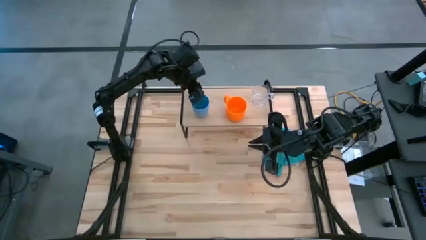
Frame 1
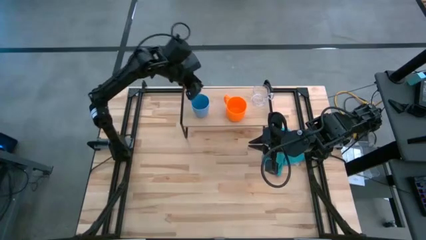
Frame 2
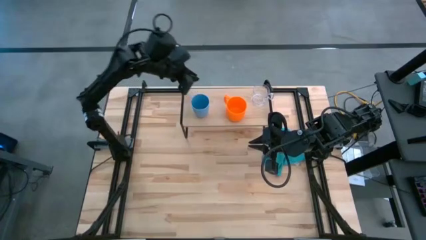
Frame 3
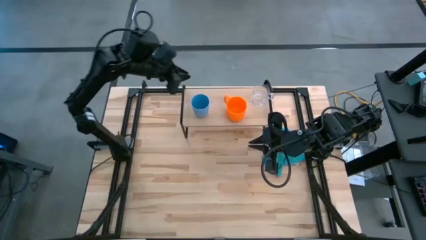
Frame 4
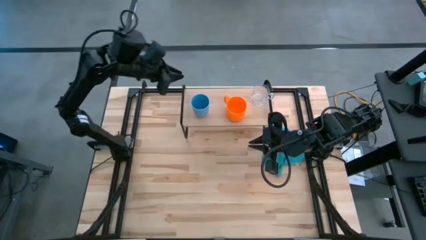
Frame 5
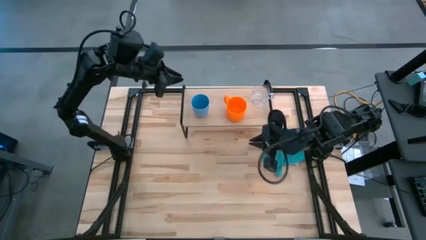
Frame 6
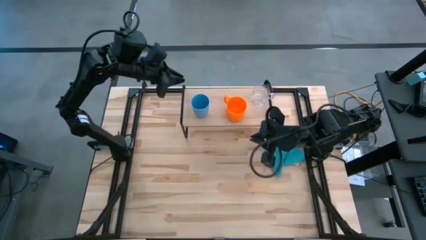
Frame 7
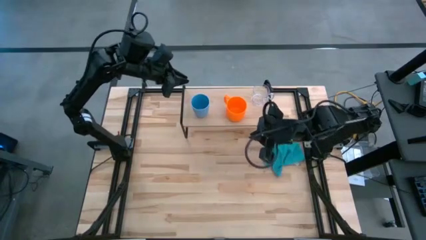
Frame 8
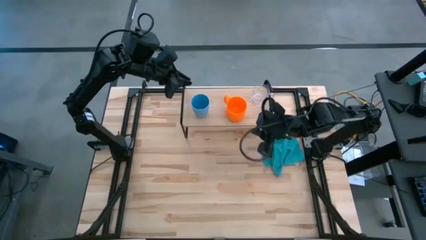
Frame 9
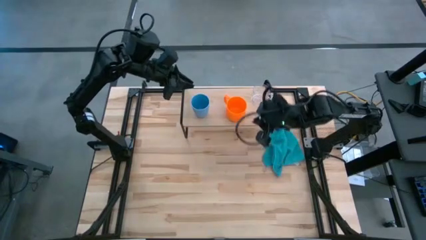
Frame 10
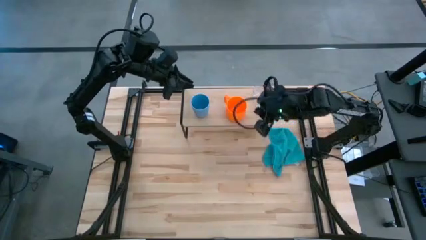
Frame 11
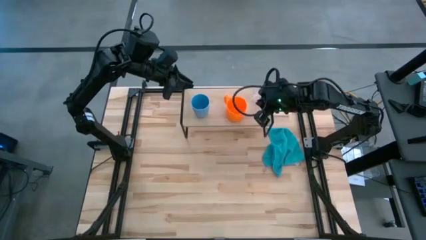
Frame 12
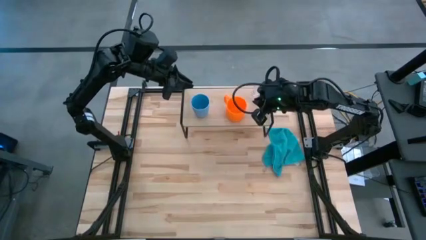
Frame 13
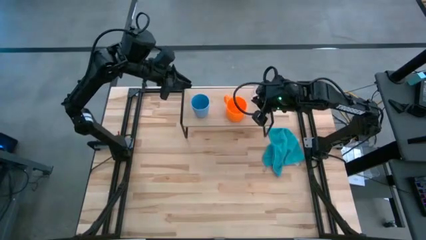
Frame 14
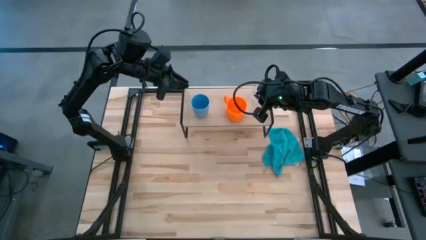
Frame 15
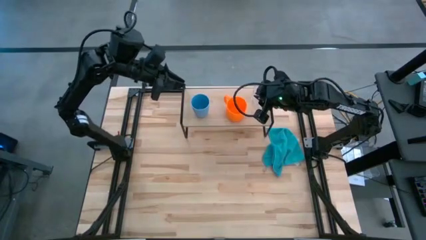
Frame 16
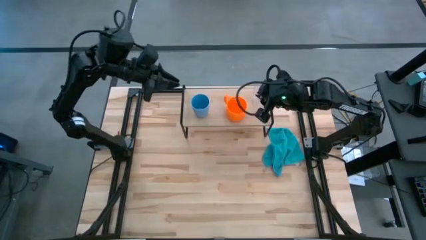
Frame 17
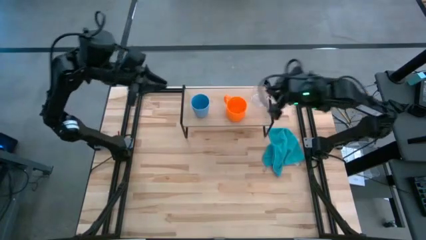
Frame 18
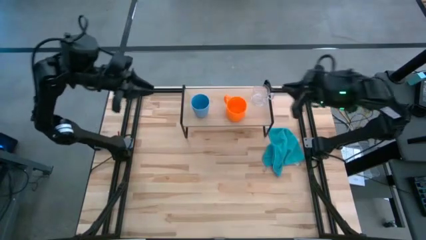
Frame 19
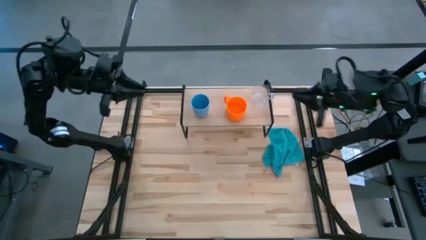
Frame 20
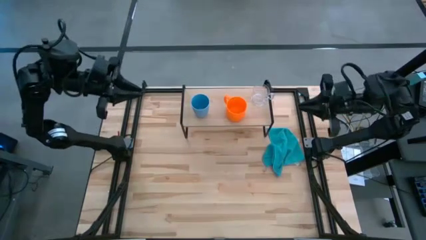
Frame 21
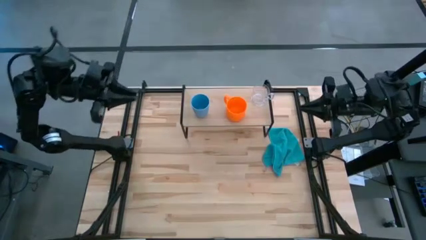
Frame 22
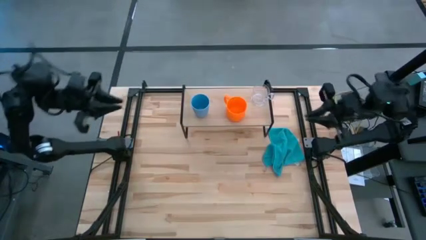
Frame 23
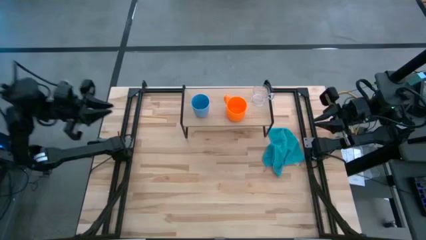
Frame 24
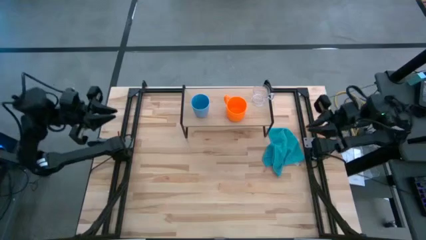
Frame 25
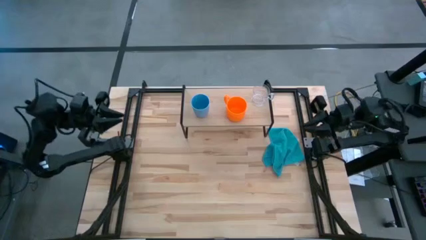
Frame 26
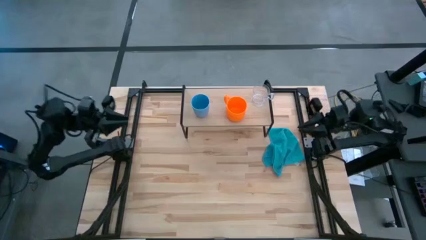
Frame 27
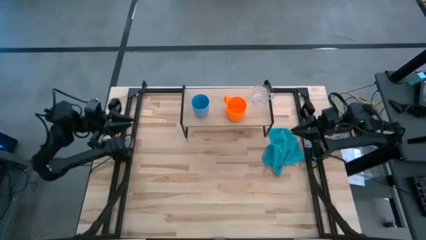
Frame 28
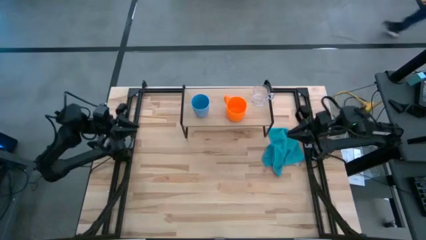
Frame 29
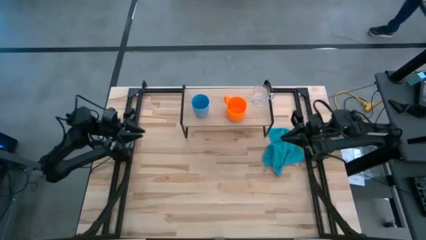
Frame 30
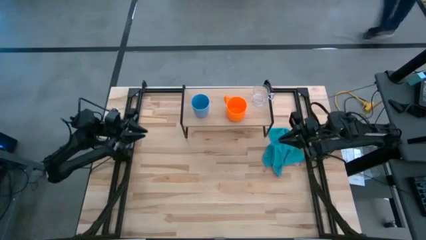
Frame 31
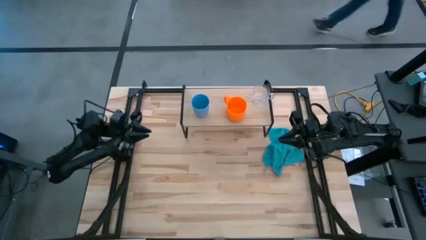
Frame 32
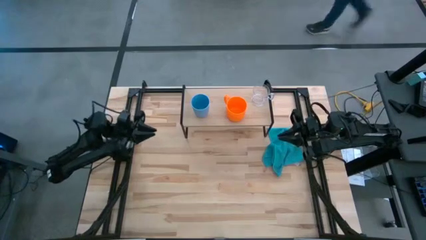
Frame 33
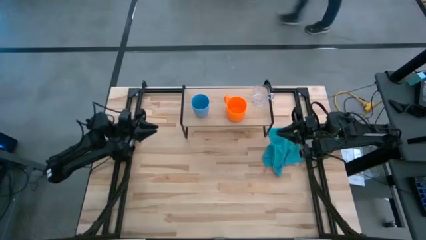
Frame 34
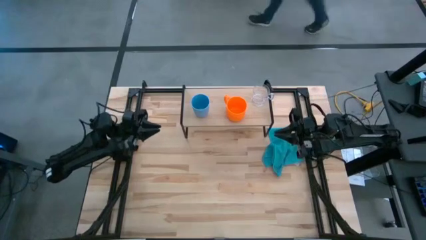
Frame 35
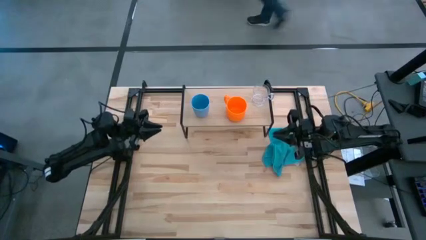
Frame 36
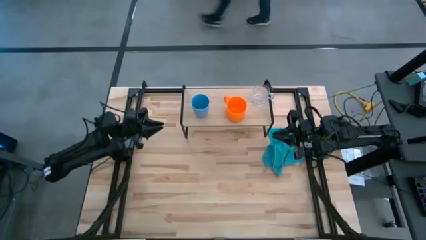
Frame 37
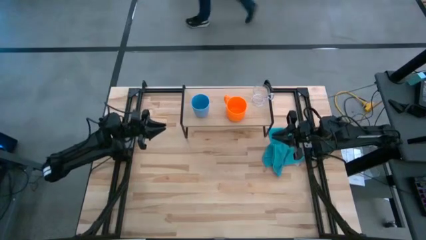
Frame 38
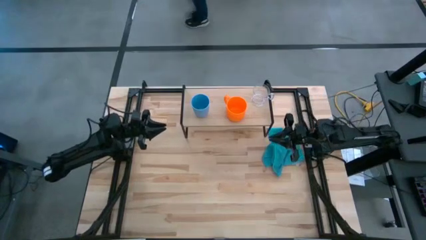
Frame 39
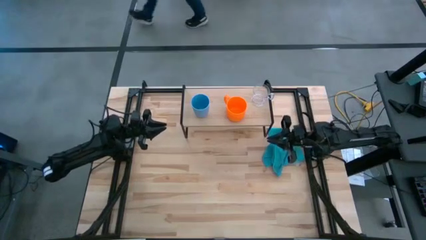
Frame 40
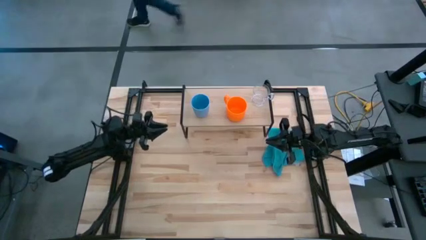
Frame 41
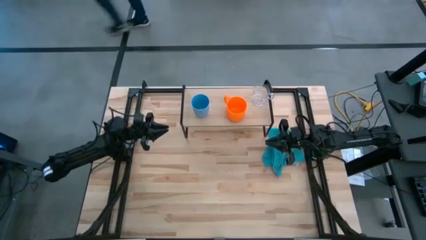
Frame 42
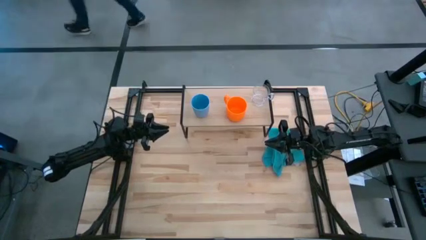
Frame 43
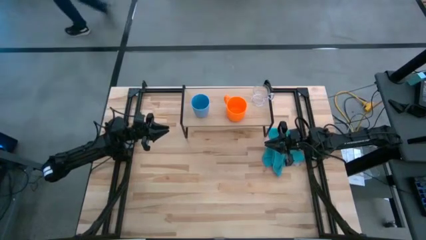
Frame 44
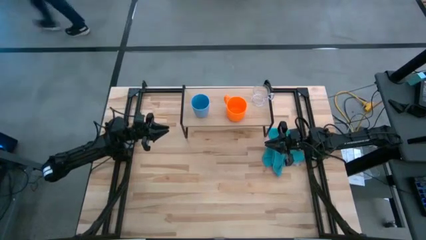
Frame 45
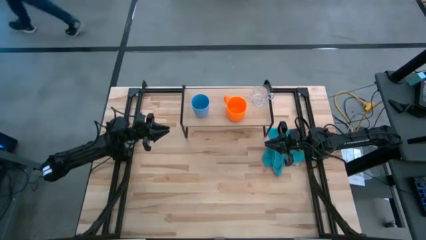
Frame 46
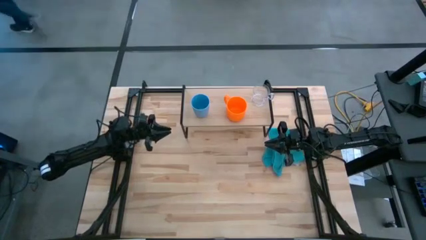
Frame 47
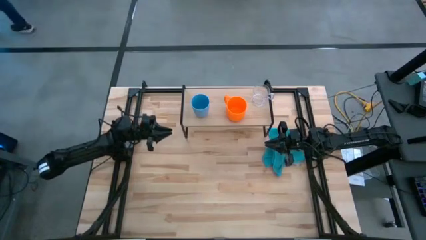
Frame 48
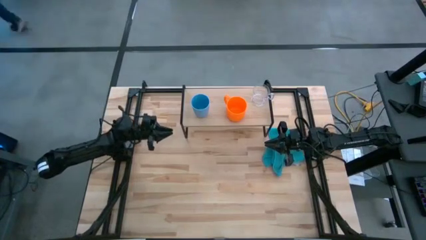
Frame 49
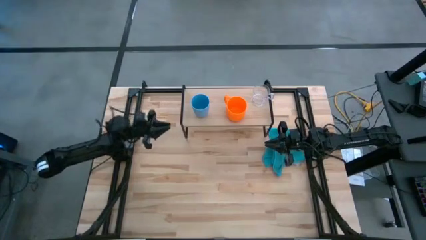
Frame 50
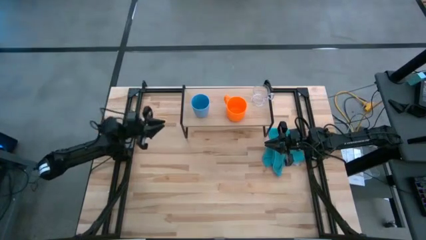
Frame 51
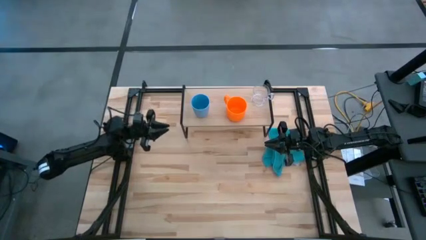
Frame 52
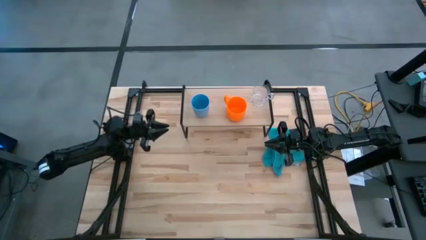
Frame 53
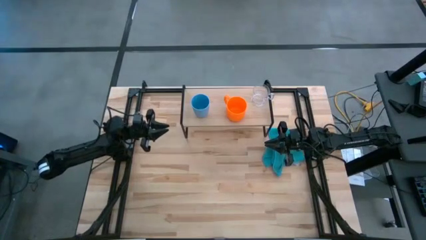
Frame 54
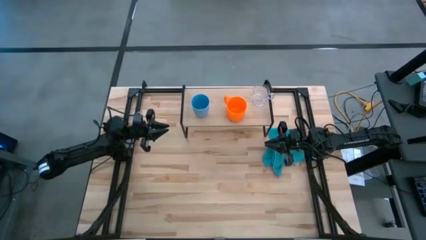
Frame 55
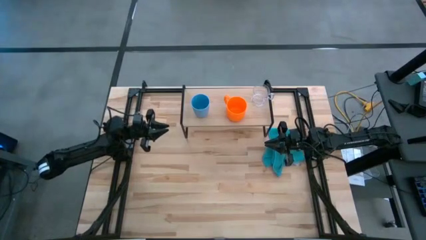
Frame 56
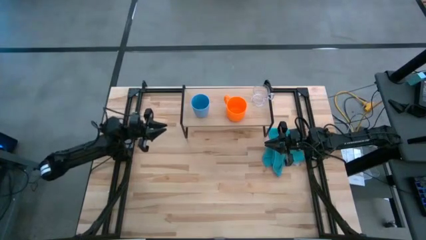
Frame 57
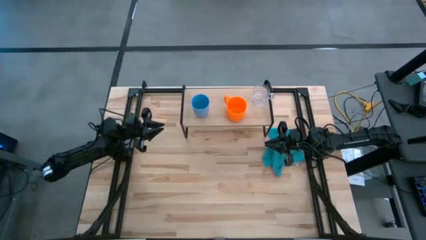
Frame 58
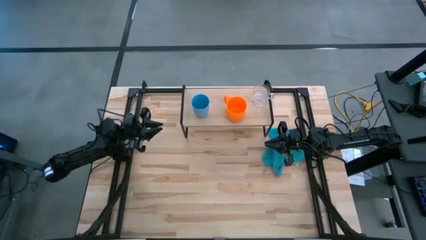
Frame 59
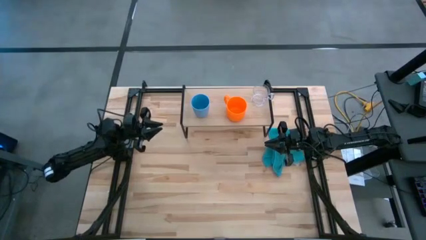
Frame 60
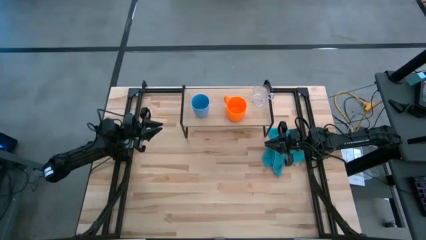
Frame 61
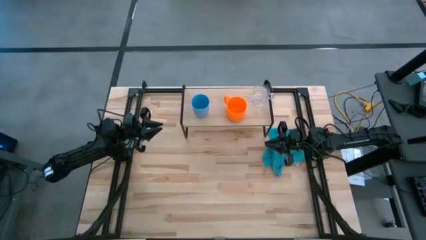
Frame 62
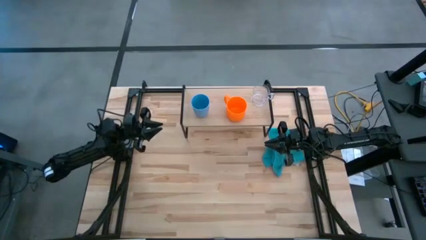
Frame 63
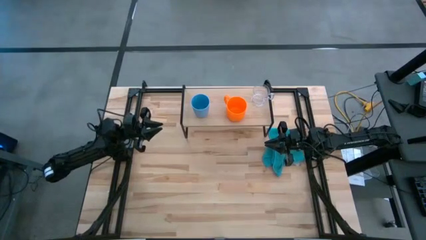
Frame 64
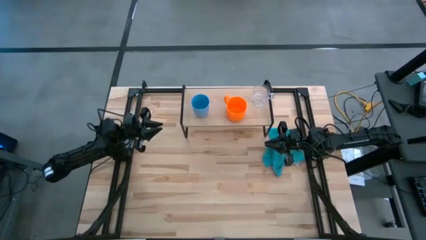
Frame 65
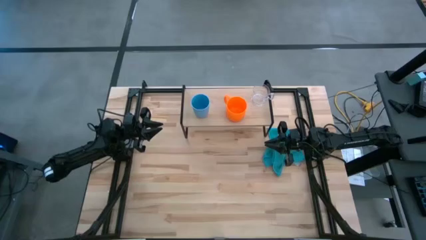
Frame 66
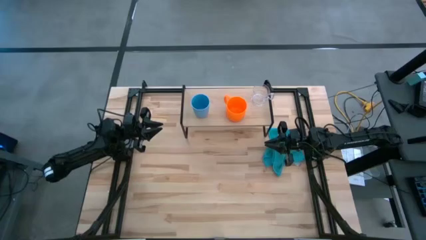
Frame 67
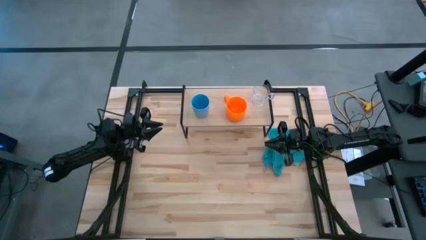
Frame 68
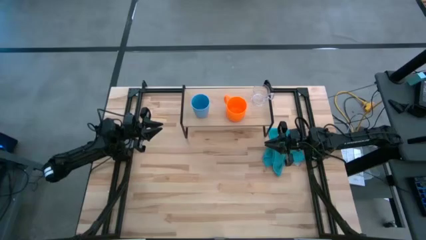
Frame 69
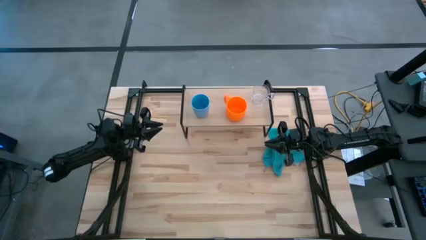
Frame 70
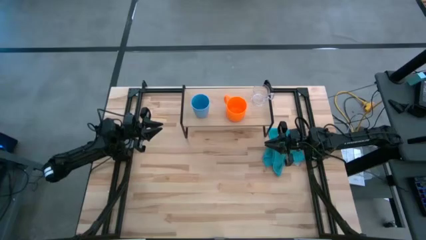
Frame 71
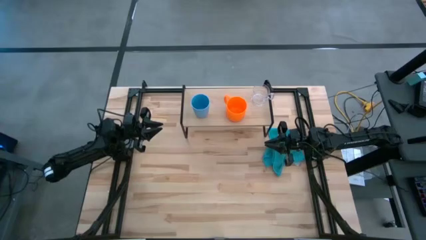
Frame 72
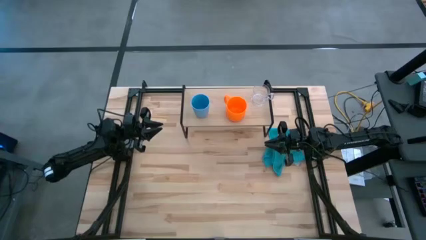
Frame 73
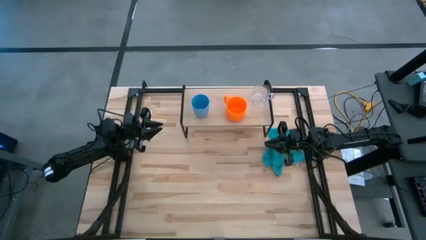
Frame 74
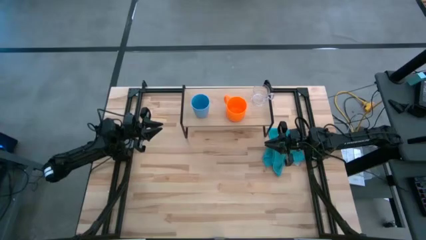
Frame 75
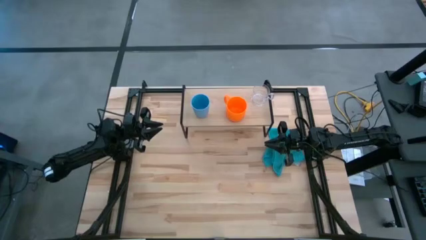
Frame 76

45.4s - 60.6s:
Task: Stack small to large cups/mugs on shelf
Return to Home Position
